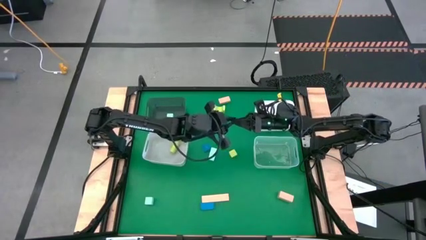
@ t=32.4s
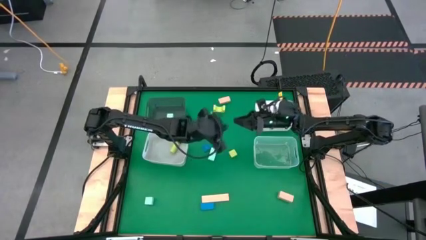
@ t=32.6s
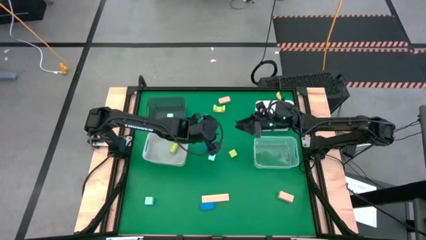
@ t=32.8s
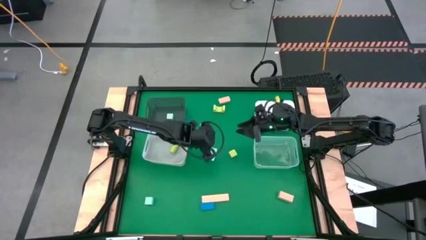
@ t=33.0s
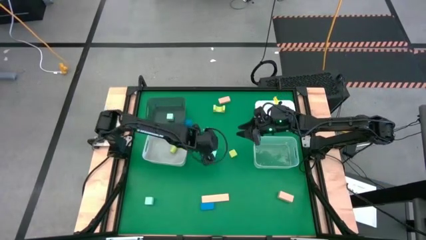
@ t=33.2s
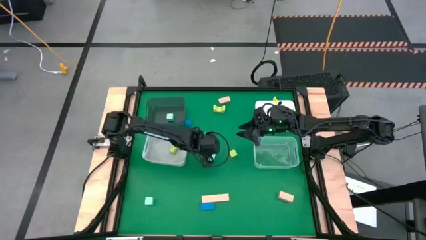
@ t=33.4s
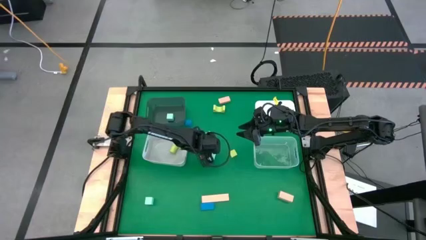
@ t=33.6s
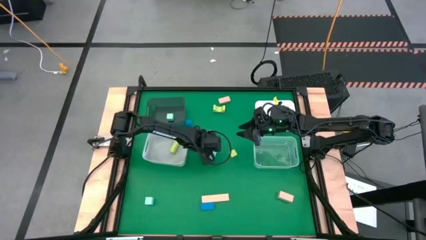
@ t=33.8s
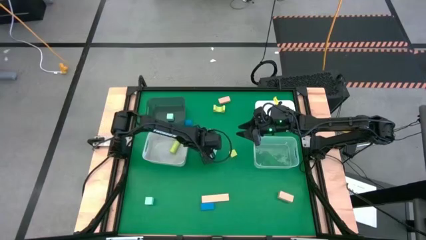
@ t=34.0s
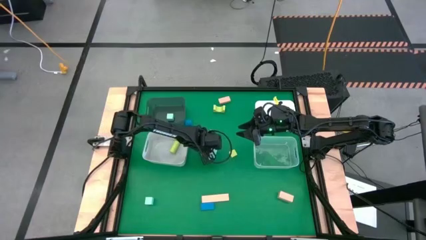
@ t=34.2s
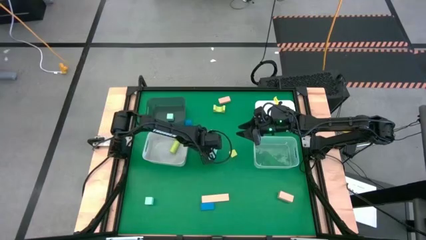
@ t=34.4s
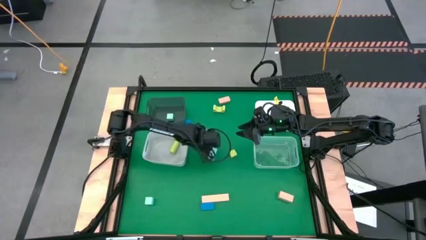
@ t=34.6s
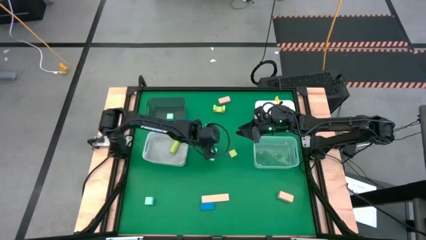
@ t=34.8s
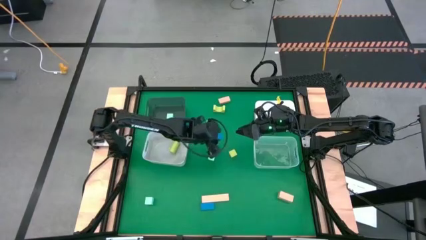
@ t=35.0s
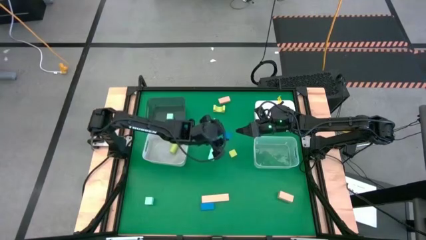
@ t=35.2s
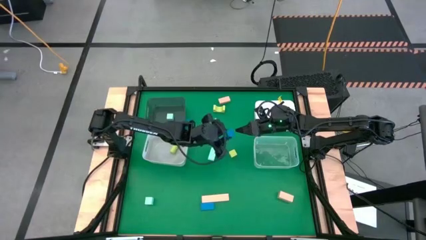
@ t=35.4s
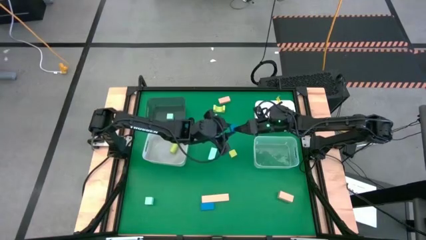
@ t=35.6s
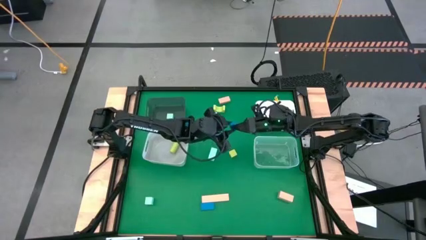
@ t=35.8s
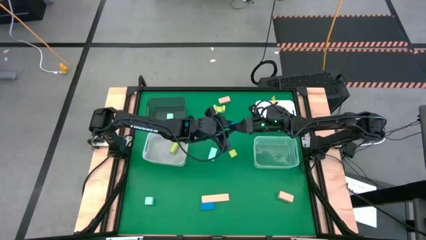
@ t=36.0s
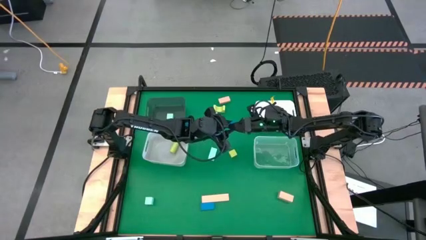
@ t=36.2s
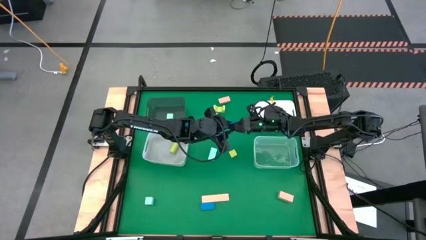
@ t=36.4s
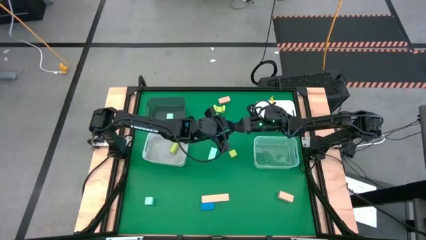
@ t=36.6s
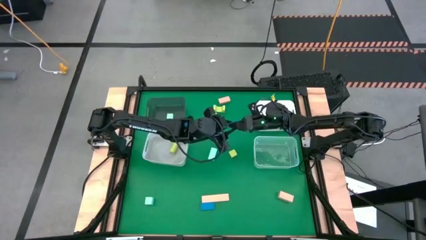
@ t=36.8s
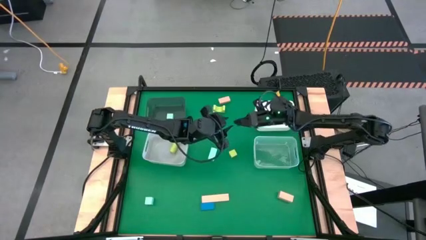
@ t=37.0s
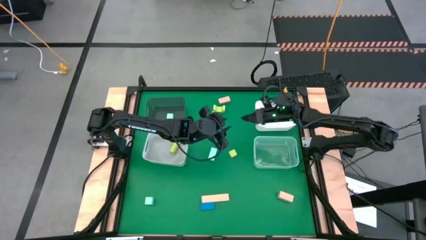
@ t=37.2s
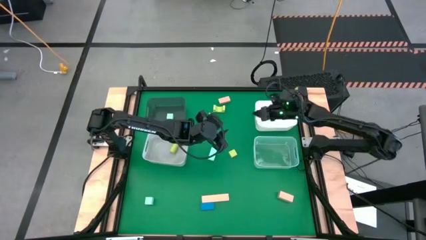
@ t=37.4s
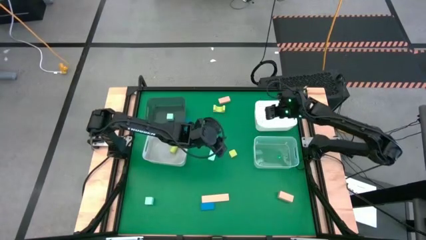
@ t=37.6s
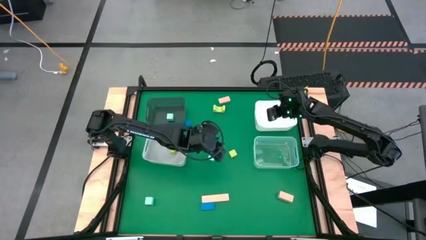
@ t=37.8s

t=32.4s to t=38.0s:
Task: Sort & place blocks by color
Put the middle blue block into the white bin

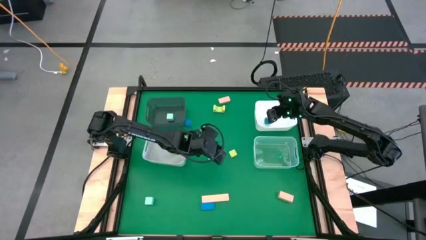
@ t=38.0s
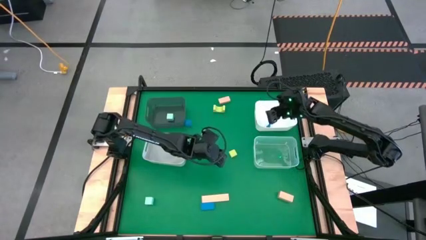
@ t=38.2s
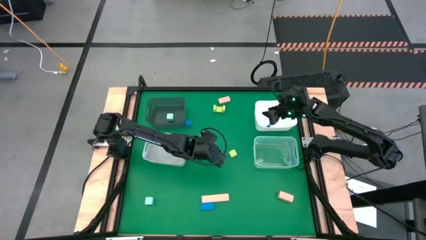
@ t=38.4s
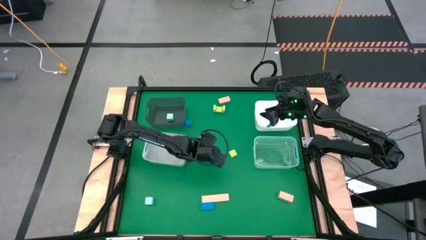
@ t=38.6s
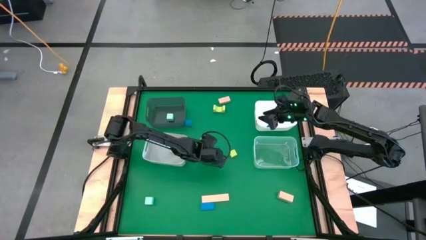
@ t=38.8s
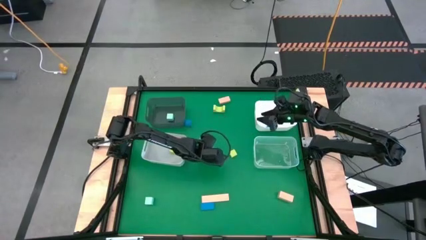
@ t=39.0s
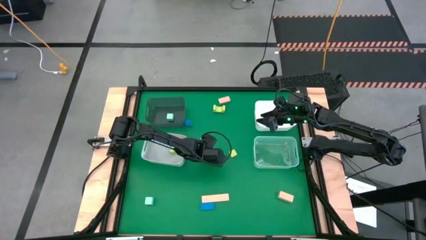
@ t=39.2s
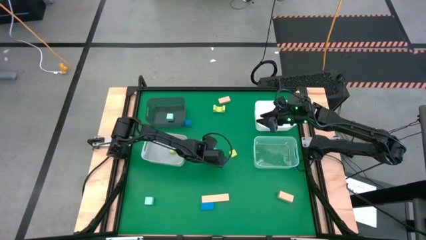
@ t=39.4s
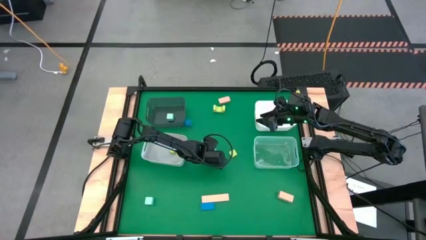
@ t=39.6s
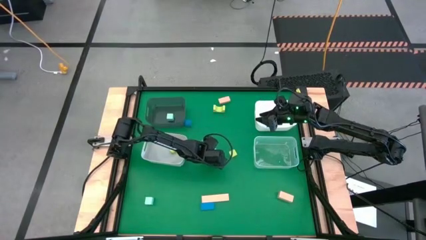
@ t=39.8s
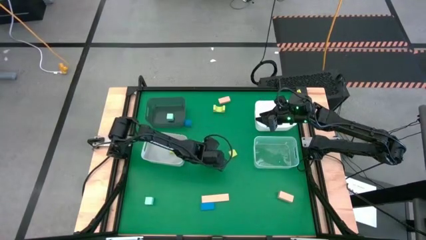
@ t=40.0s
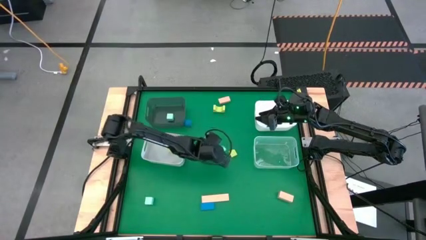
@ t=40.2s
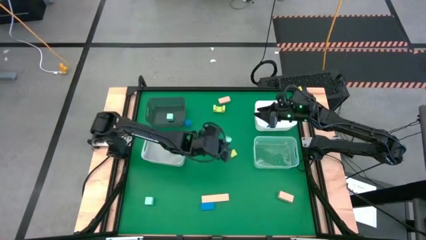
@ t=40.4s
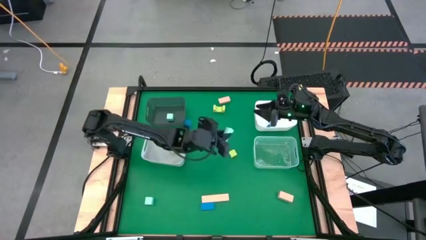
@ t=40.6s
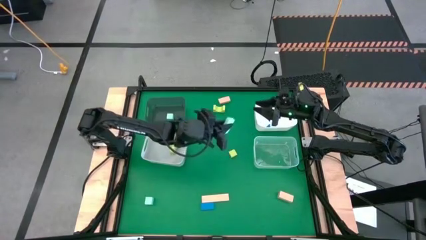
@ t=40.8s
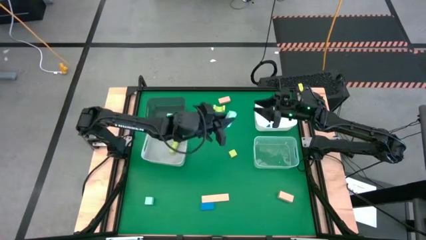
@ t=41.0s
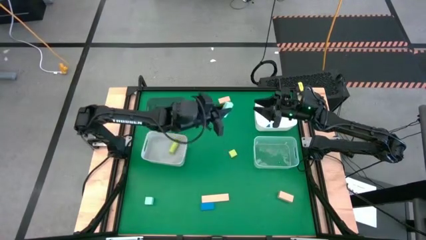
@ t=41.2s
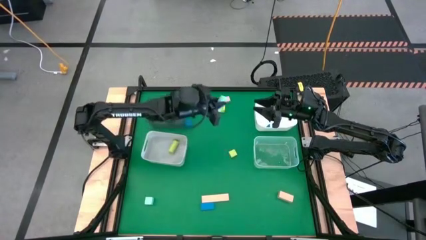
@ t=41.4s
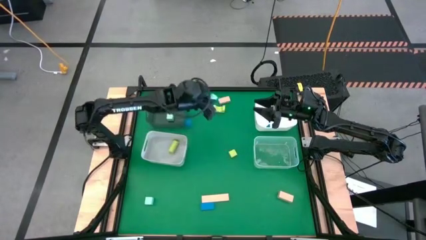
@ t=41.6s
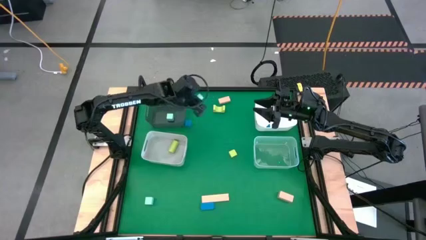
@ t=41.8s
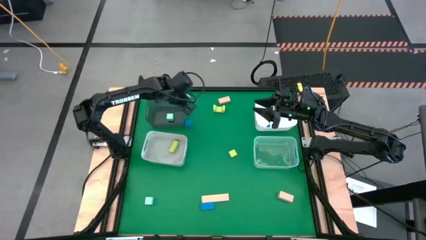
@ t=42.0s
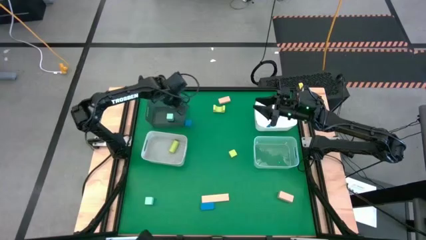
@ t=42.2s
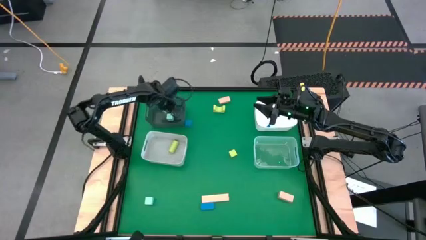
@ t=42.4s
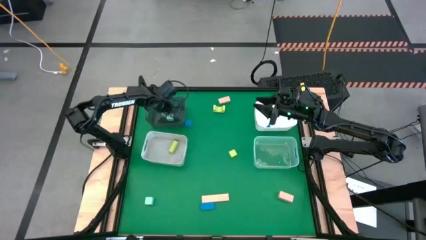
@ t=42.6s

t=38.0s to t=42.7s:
Put the top light blue block into the black bin

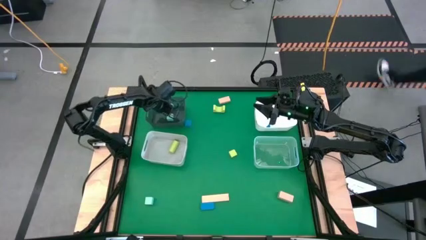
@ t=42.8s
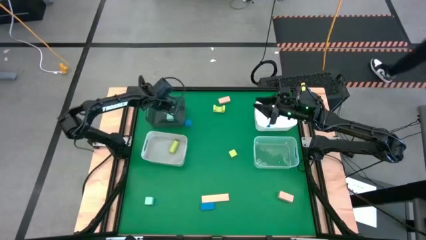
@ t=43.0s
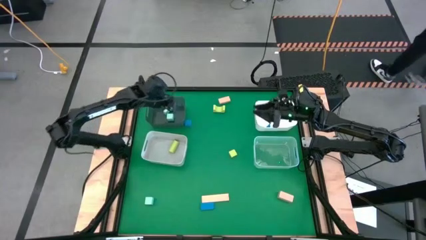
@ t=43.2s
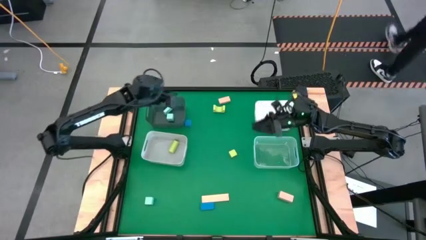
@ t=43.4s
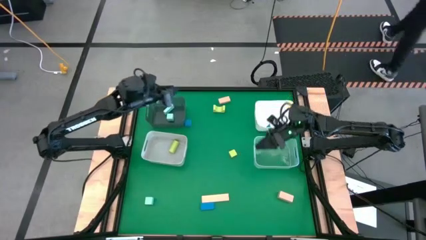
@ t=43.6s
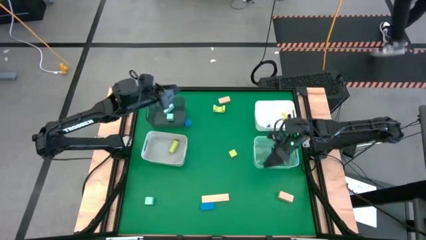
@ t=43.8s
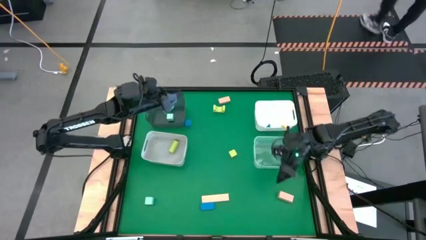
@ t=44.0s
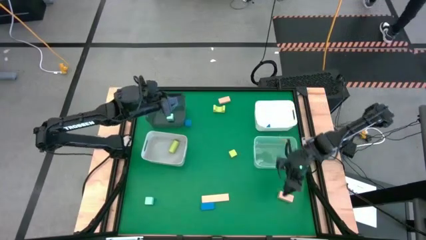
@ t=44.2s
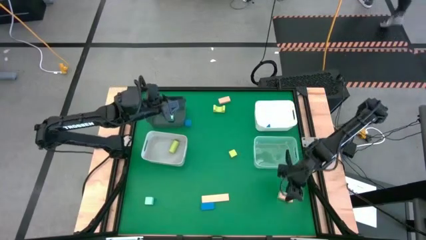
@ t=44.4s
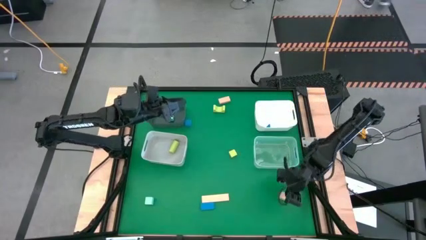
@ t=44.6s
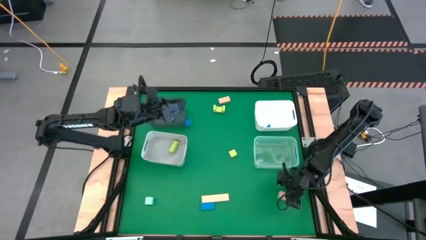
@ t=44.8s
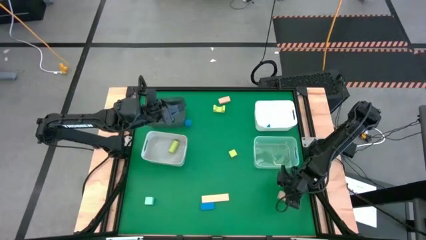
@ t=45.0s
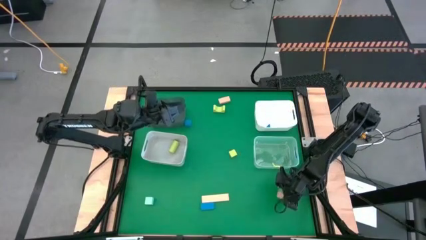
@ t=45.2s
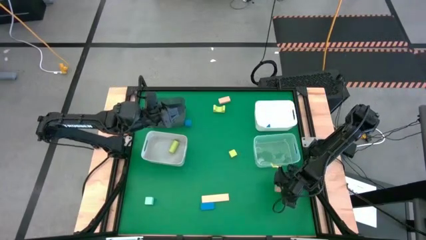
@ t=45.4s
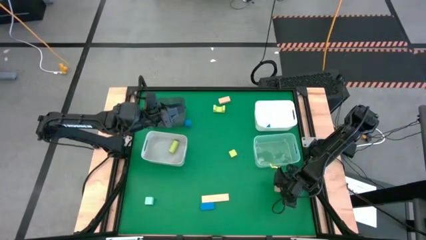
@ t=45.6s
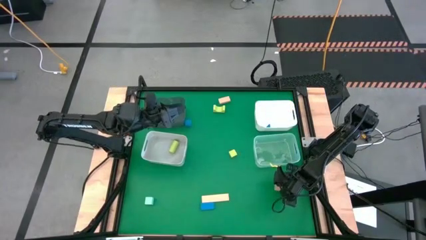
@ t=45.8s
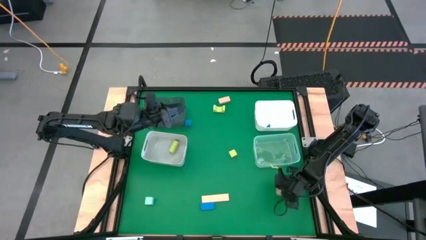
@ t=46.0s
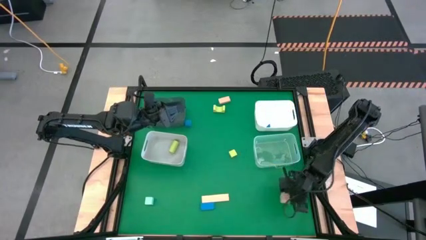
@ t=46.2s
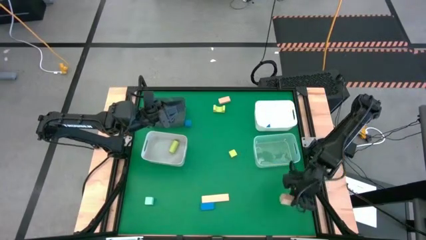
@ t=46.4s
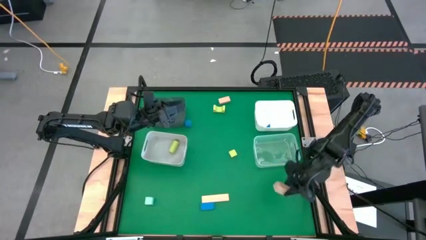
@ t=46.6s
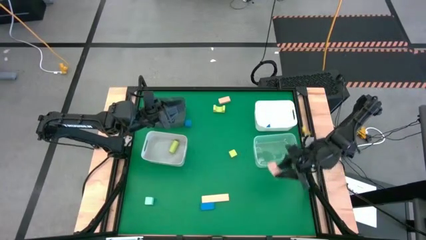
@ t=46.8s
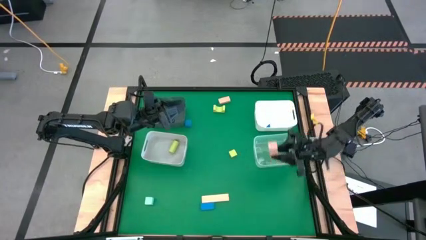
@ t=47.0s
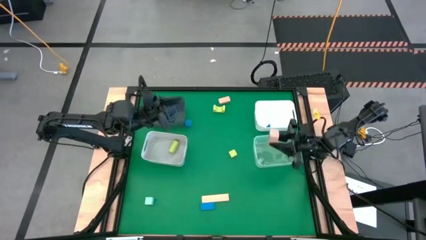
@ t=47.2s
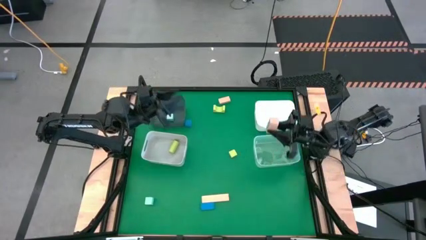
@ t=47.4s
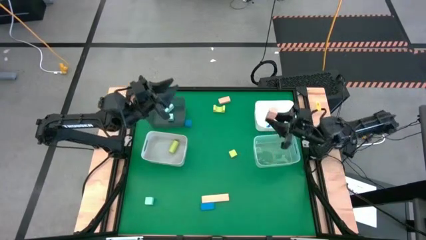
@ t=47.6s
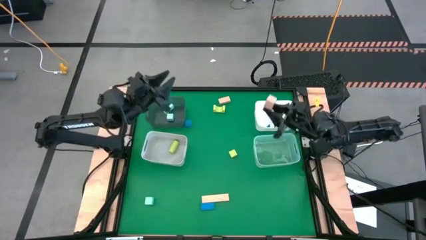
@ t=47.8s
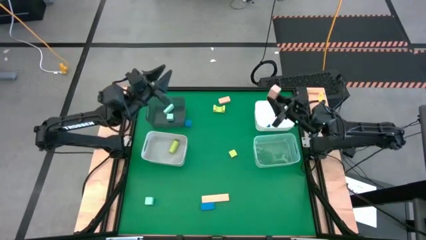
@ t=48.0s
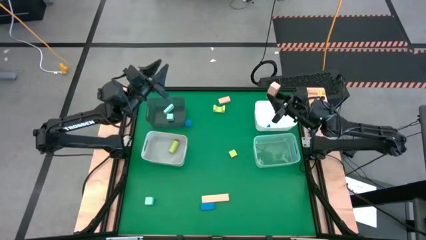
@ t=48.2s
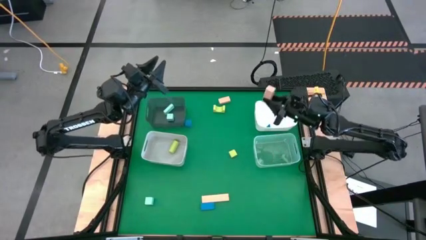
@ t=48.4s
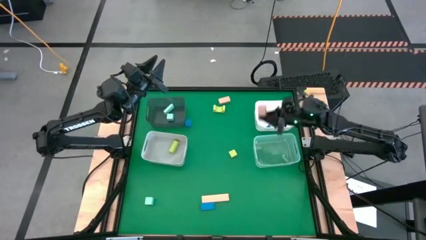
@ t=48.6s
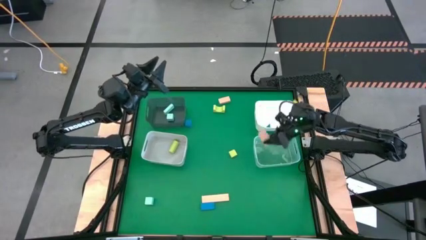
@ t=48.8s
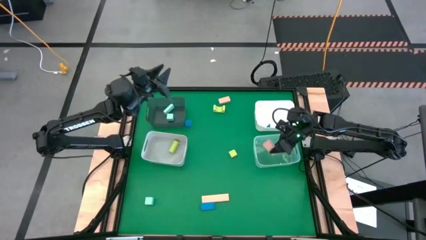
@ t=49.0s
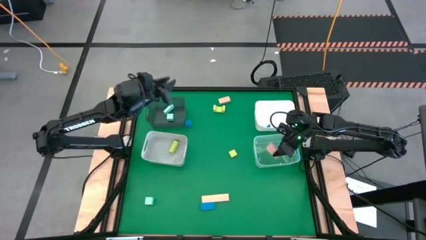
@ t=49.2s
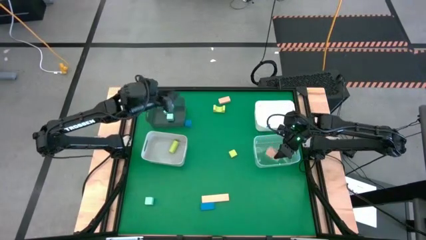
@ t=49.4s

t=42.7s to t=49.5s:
Put the bottom right brown block into the transparent bin
